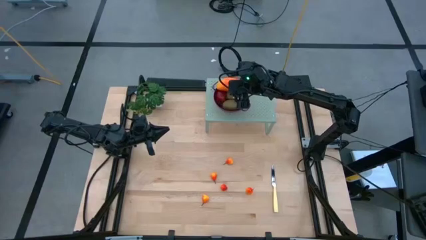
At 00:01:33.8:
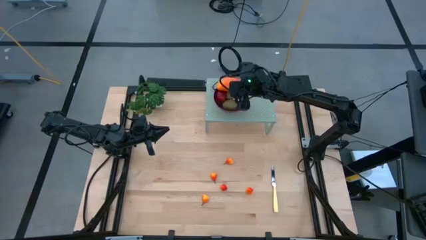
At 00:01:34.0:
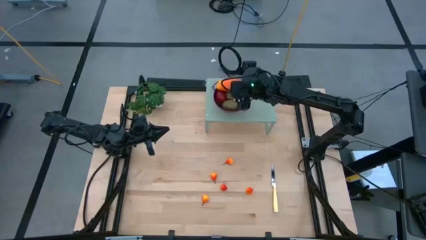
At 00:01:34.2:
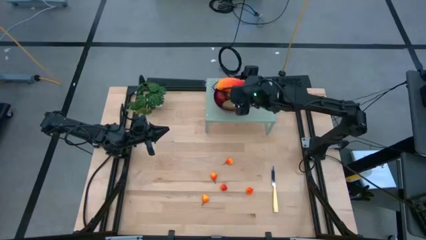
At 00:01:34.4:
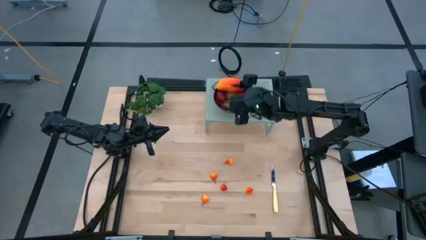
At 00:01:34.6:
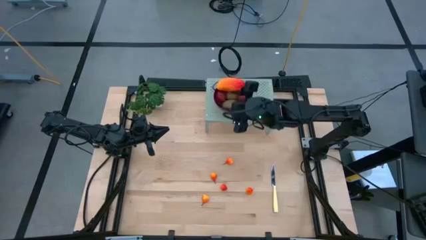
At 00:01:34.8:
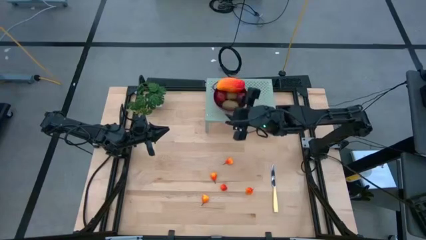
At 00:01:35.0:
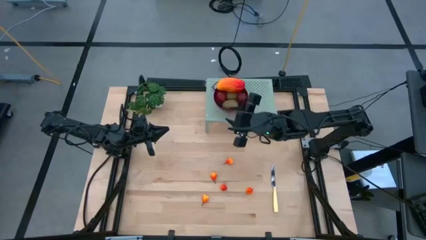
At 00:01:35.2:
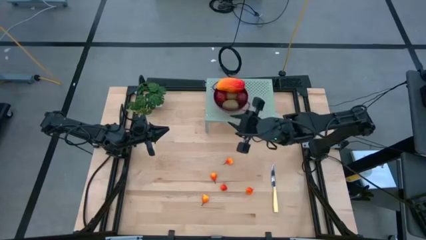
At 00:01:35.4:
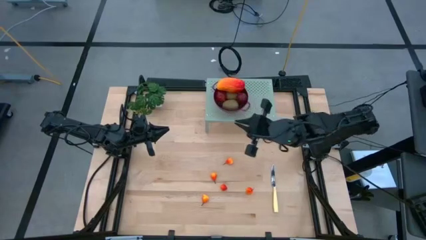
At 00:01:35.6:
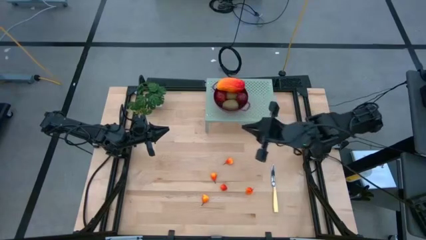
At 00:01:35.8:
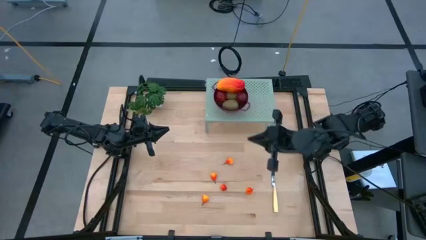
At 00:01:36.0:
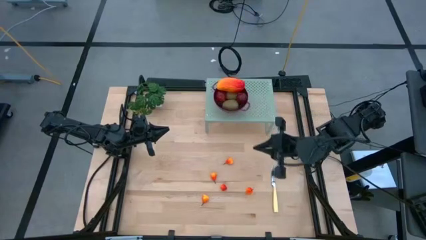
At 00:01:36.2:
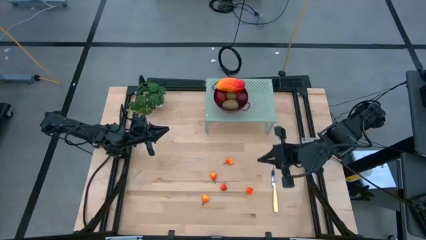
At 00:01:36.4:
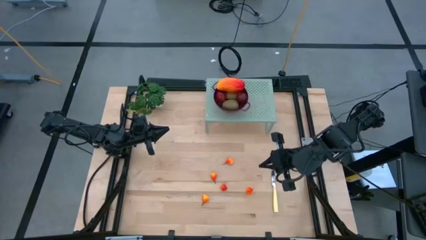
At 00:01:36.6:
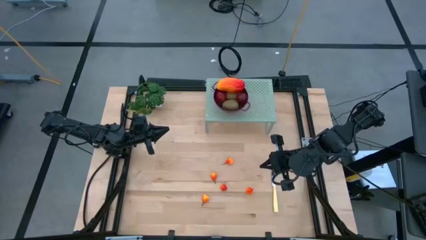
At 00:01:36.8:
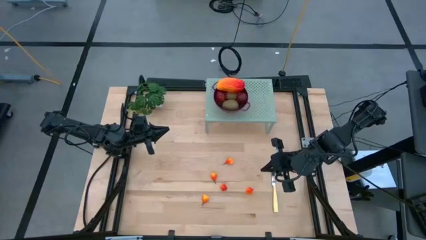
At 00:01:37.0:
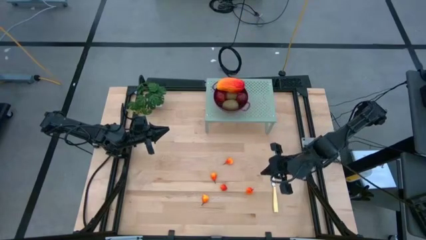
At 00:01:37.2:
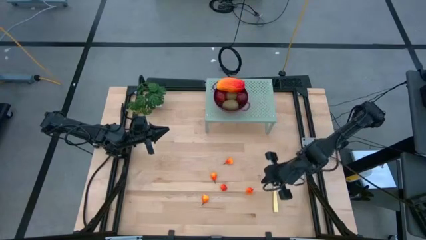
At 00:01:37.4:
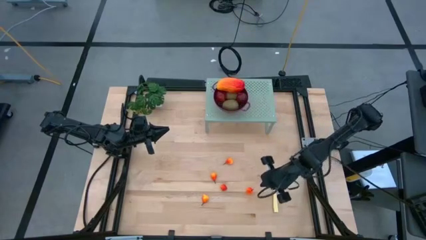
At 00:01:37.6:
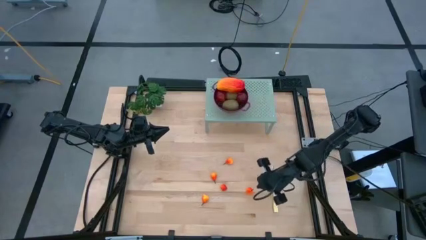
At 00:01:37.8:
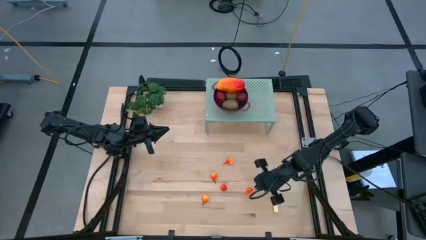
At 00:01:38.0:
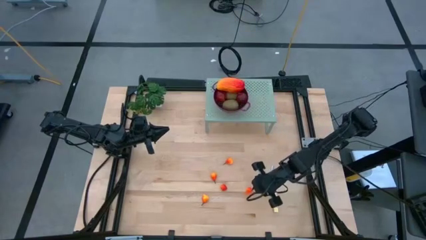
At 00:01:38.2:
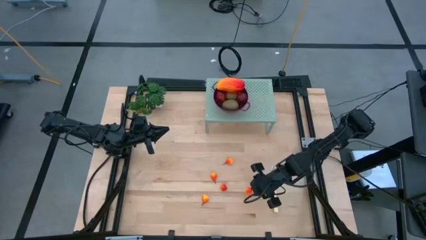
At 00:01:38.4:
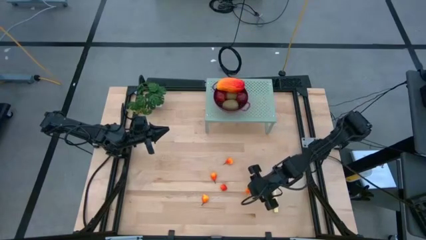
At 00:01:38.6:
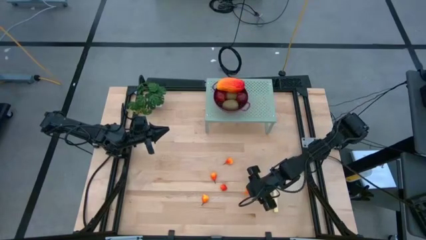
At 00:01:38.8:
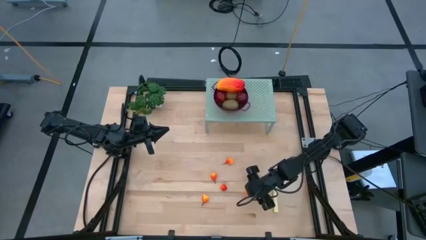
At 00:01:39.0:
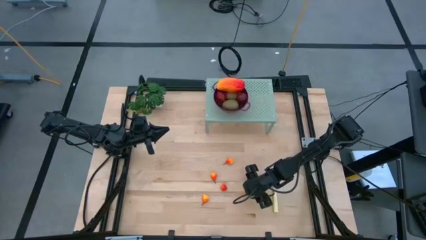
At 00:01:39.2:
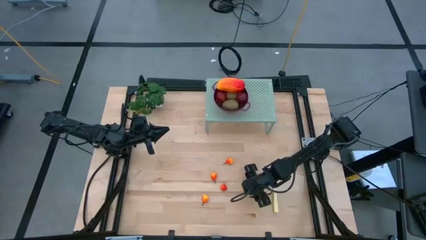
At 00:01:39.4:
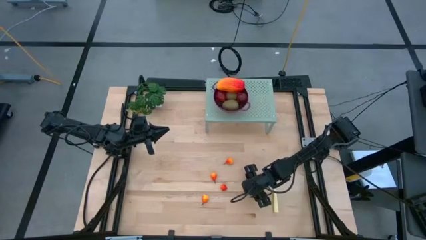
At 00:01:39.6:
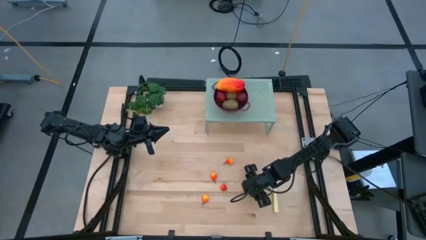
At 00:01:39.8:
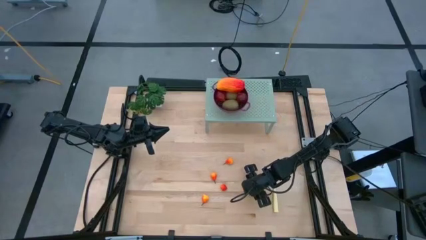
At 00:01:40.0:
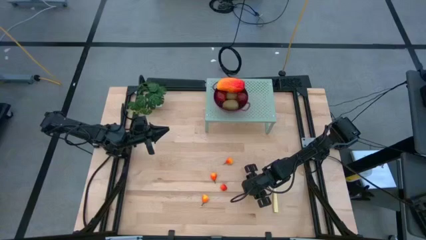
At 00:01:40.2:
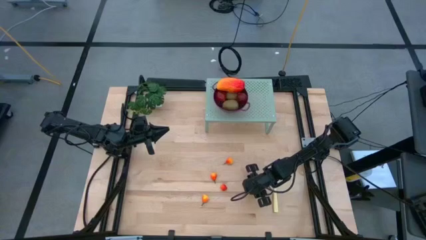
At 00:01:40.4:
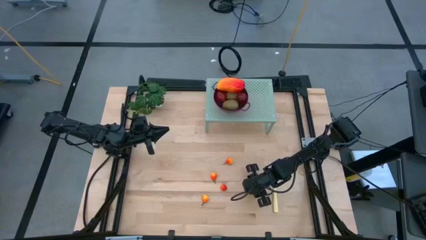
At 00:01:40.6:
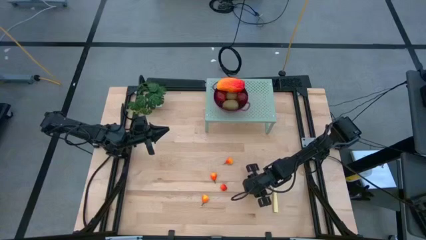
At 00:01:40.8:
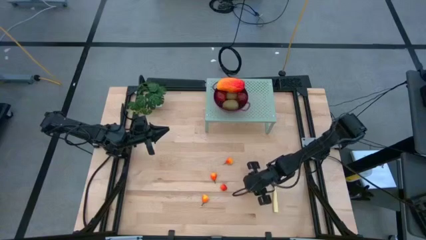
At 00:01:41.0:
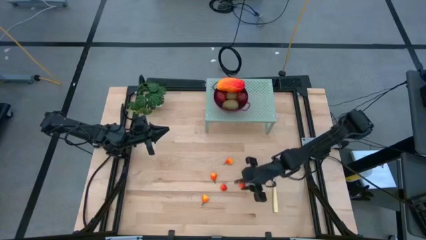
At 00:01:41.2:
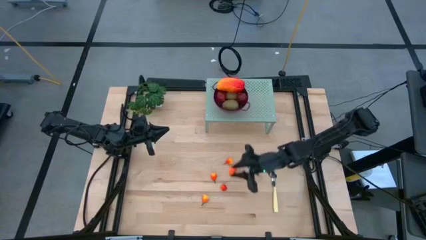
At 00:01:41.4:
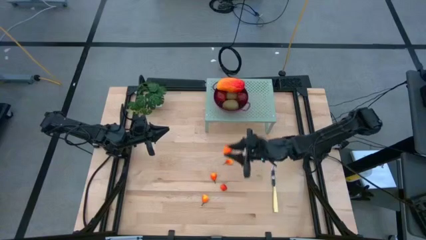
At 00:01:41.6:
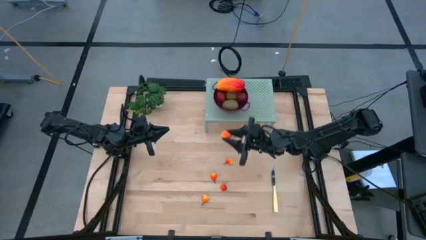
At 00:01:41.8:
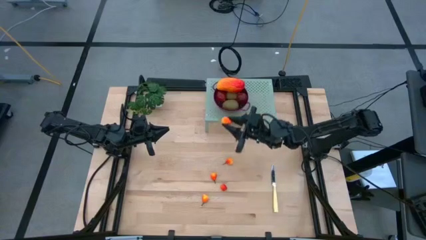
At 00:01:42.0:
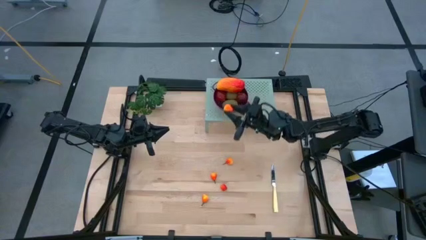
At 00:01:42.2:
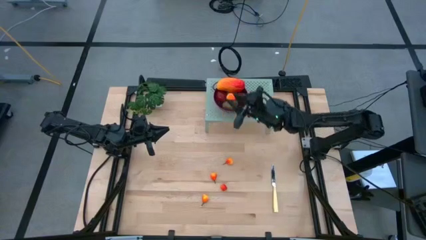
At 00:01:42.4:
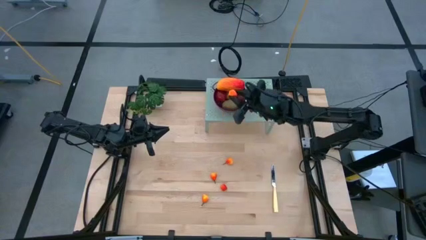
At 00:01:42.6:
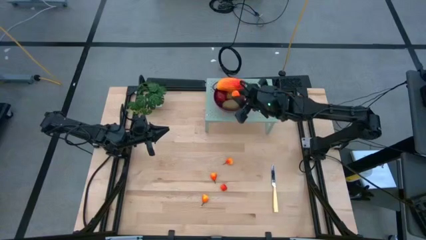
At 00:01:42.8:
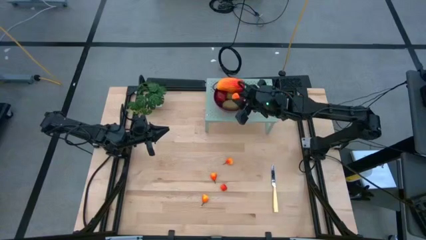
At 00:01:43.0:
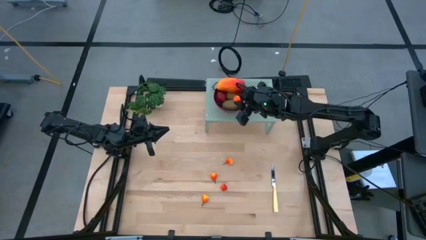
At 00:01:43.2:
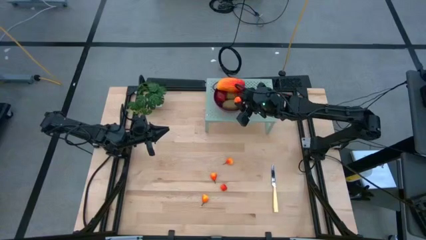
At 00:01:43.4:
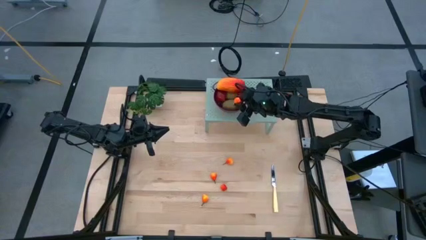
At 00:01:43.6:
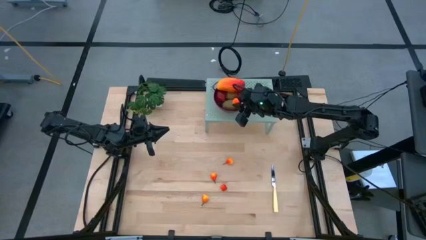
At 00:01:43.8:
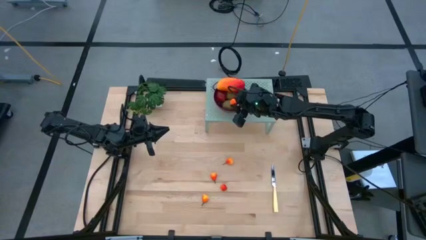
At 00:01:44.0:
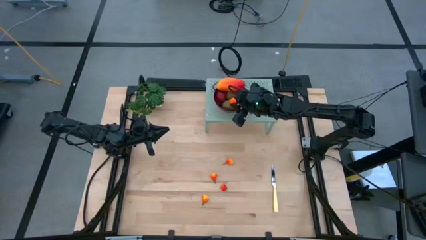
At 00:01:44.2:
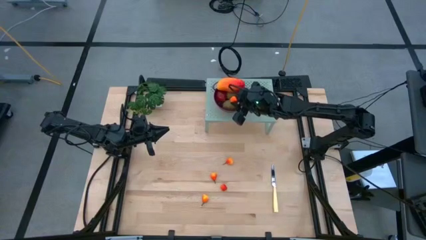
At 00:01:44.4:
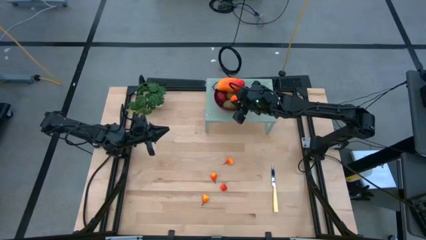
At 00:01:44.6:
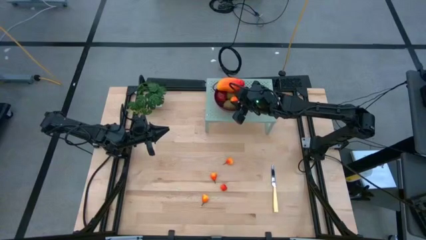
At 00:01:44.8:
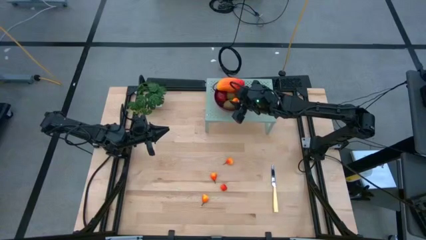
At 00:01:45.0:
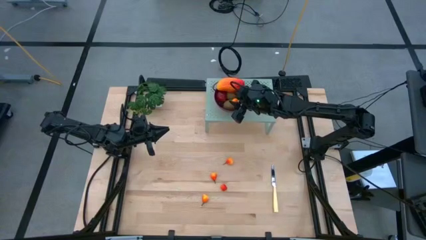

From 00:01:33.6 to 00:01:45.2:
Task: Pick & Place Fruit
Put the pear into the strainer bowl on the shelf

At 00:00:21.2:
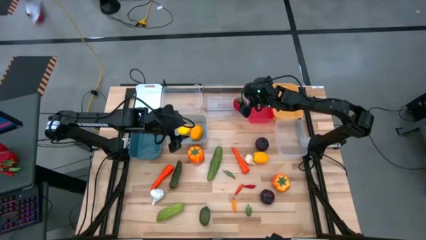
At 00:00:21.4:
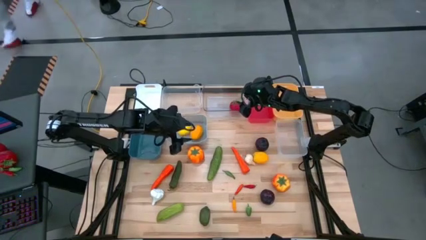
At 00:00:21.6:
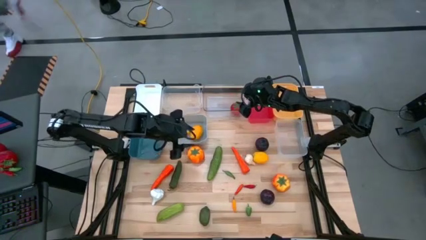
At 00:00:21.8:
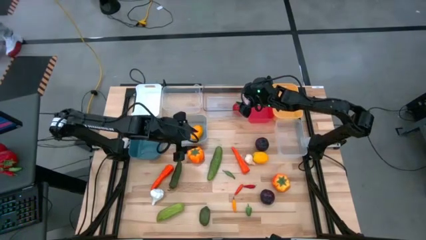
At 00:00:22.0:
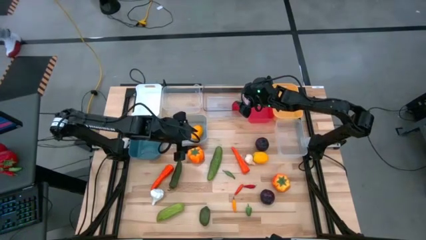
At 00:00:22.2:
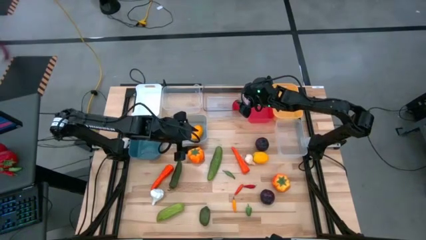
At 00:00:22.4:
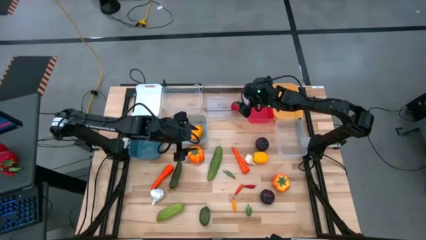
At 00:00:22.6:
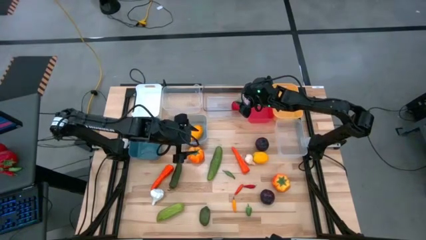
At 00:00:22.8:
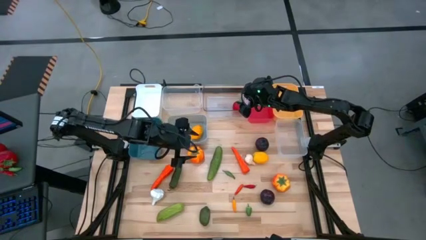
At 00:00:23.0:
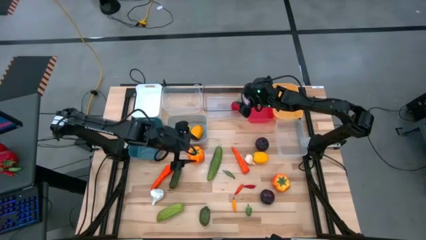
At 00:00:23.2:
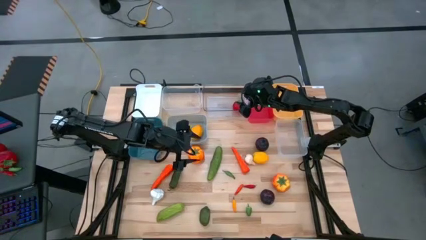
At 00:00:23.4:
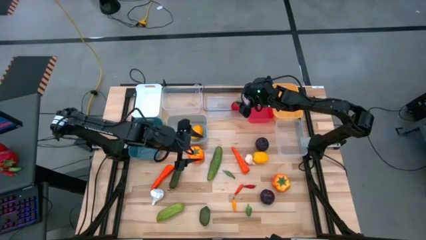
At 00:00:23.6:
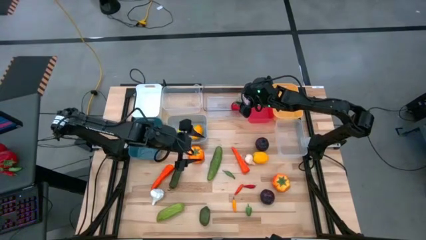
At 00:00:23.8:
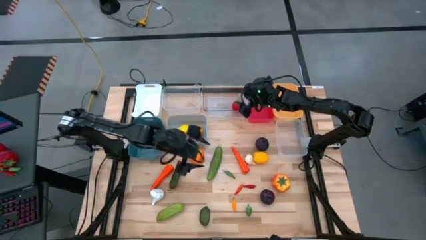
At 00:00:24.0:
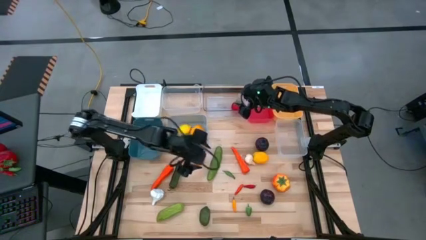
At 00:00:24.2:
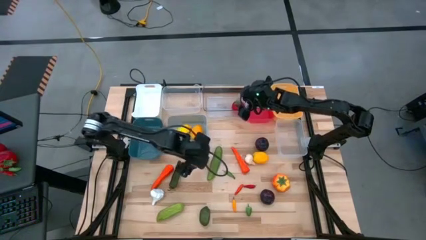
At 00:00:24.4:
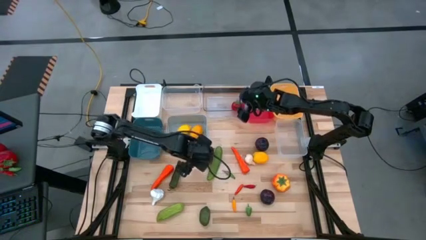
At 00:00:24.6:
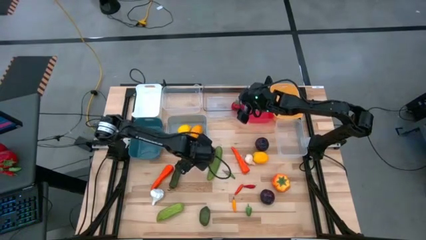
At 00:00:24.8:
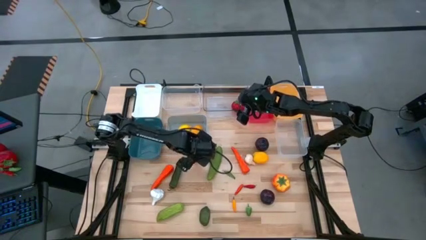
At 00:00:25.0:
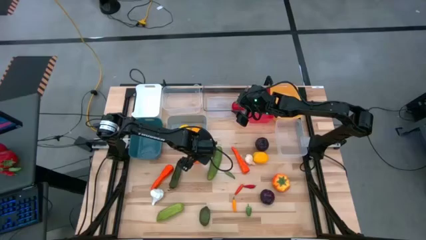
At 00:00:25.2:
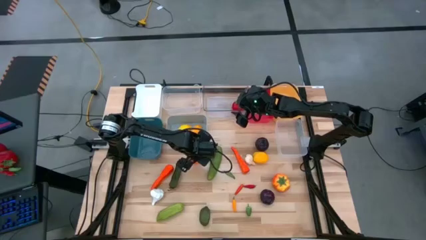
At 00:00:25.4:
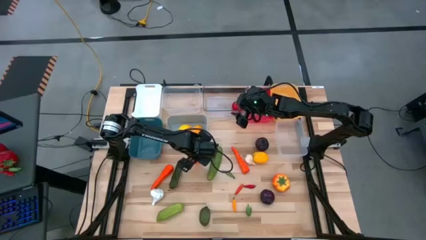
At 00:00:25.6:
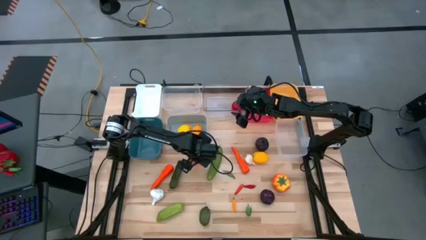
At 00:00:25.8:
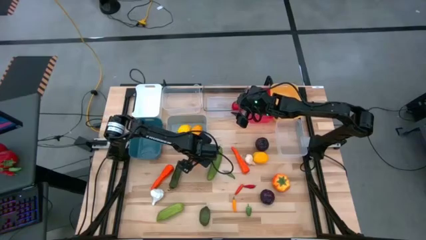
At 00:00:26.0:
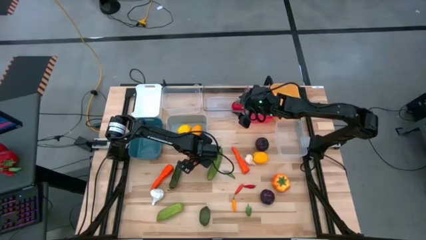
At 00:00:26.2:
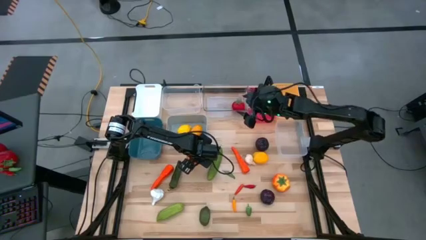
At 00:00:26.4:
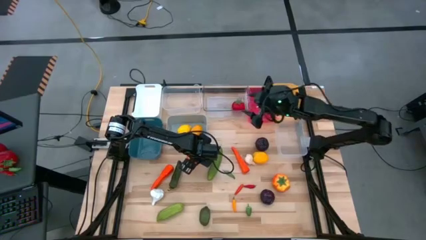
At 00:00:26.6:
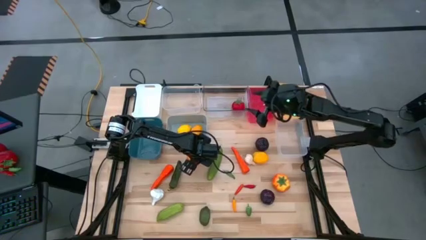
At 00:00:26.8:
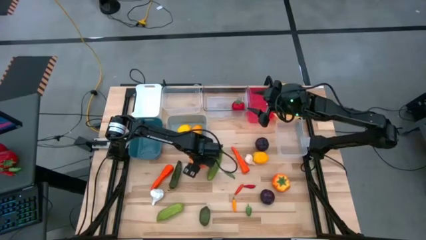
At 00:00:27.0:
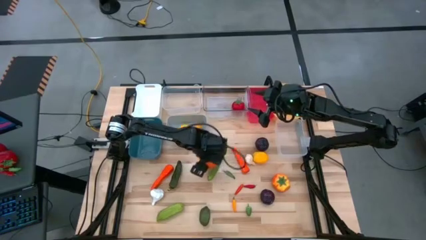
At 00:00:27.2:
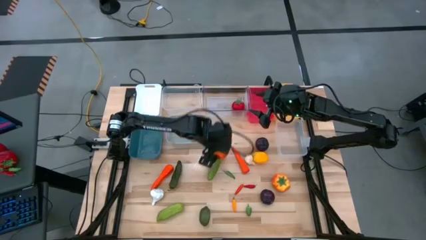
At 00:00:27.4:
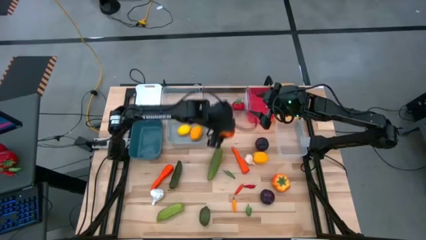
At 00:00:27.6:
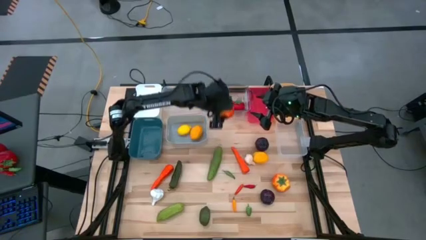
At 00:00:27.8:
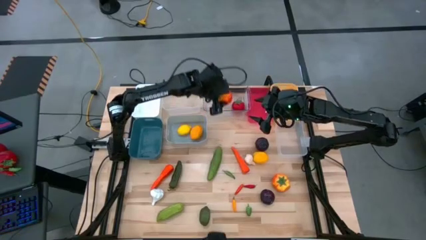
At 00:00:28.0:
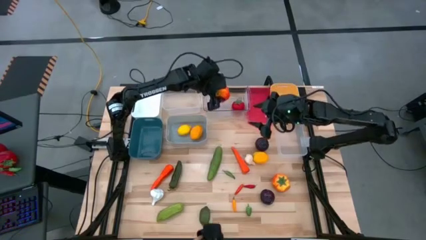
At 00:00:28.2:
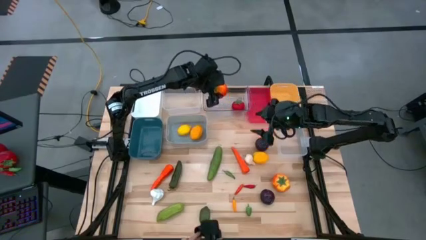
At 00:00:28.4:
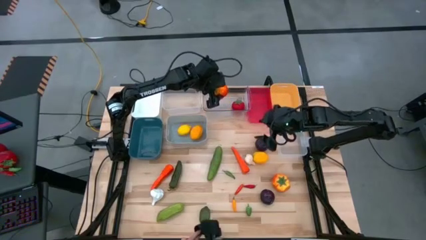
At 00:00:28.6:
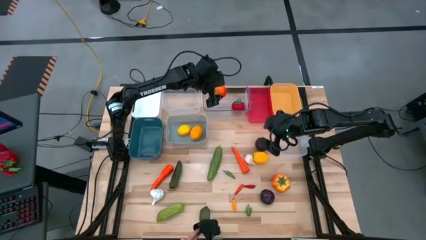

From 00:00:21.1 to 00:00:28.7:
Task: Sort produce into baskets
Put the left orange tomato into the top right transparent bin
